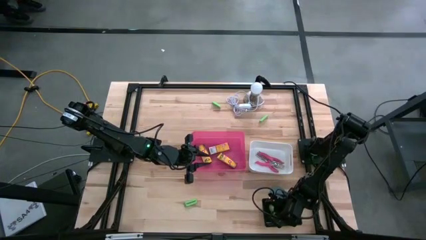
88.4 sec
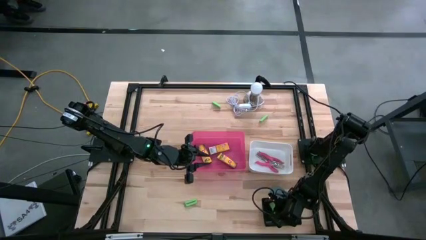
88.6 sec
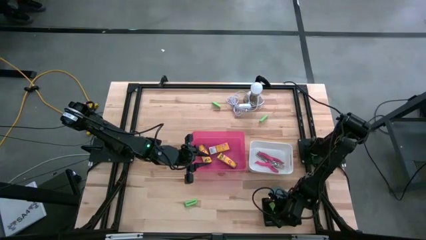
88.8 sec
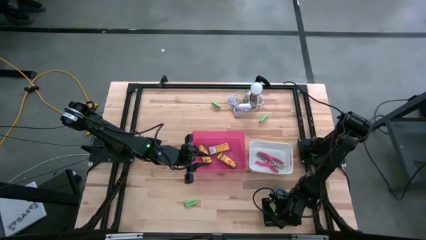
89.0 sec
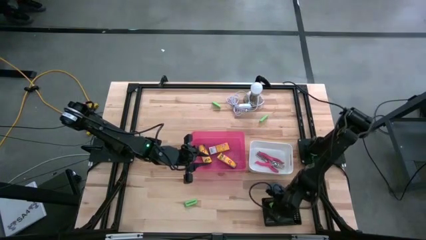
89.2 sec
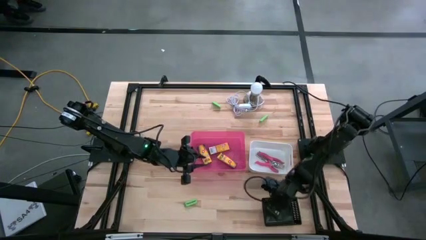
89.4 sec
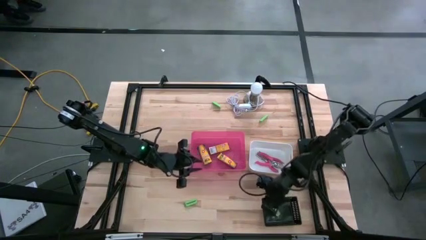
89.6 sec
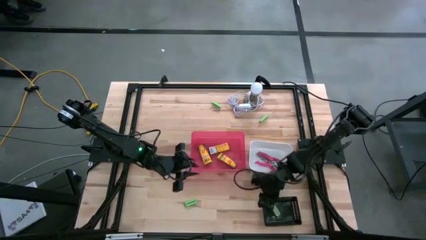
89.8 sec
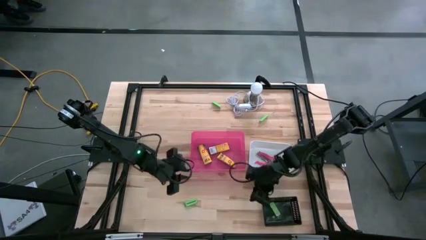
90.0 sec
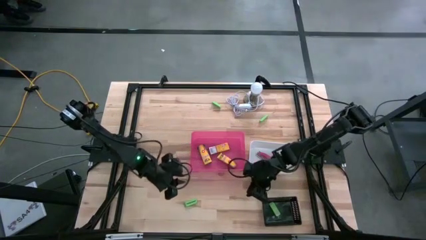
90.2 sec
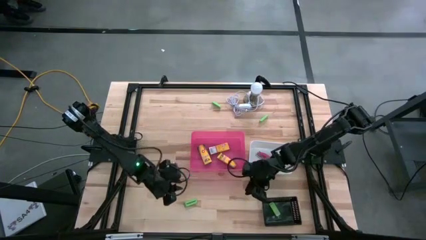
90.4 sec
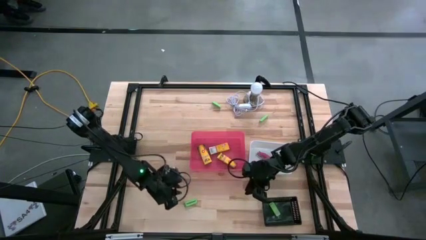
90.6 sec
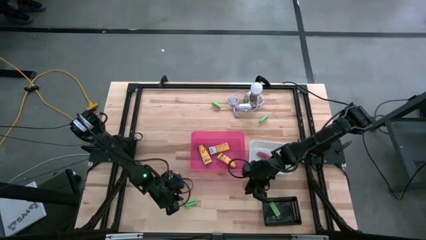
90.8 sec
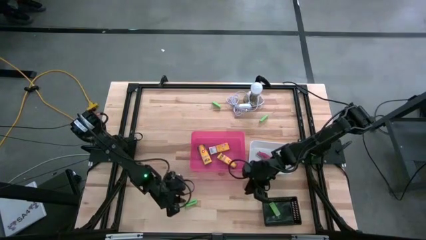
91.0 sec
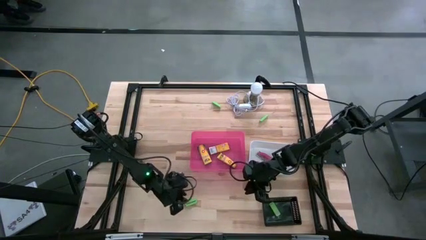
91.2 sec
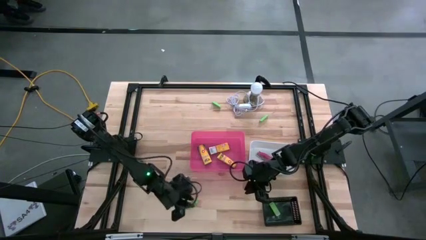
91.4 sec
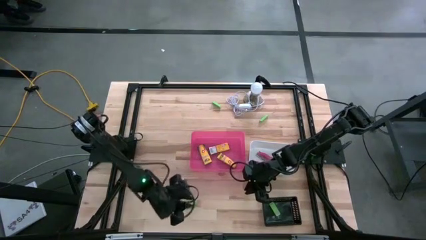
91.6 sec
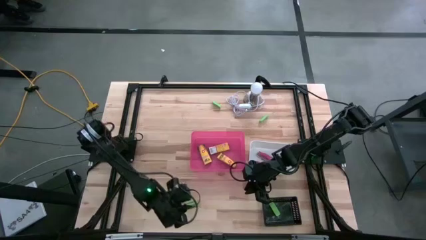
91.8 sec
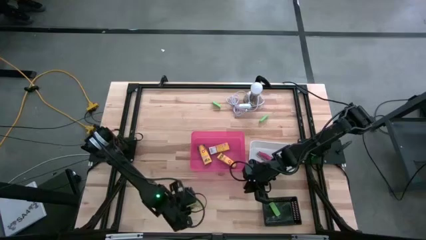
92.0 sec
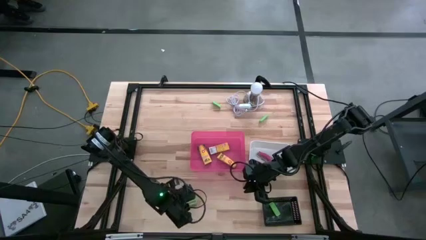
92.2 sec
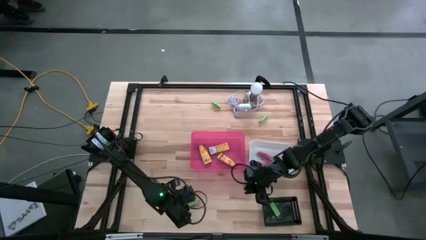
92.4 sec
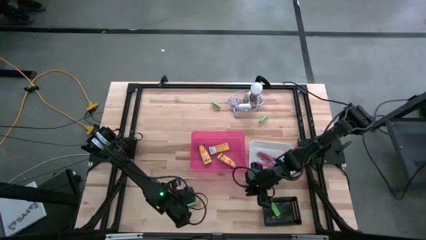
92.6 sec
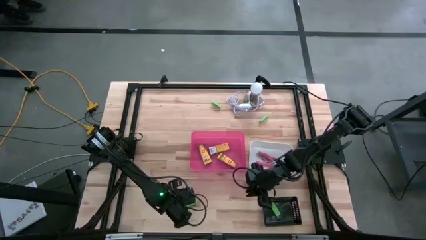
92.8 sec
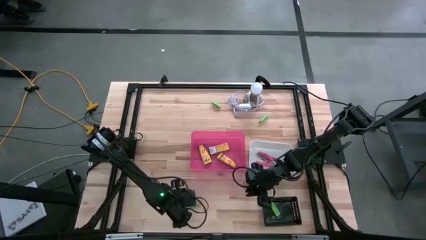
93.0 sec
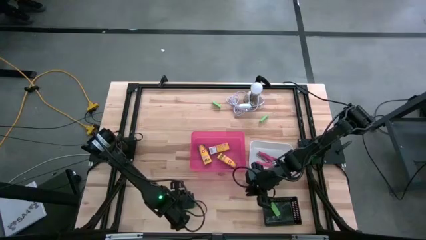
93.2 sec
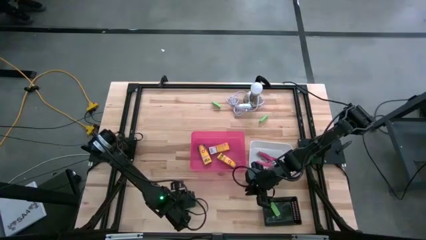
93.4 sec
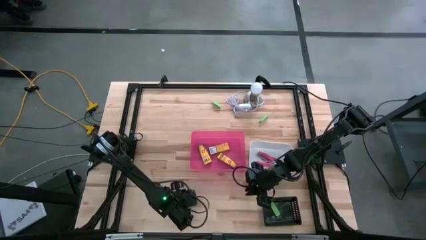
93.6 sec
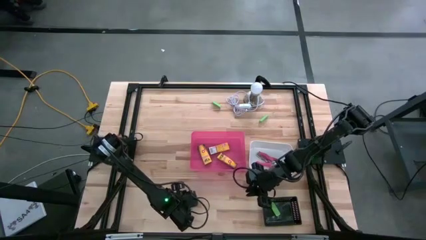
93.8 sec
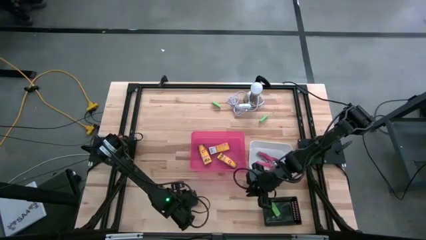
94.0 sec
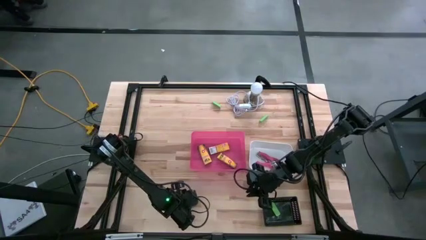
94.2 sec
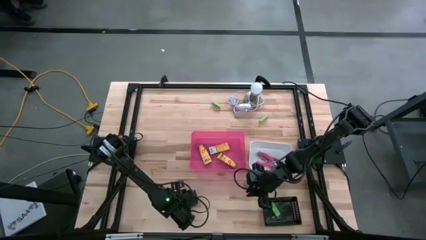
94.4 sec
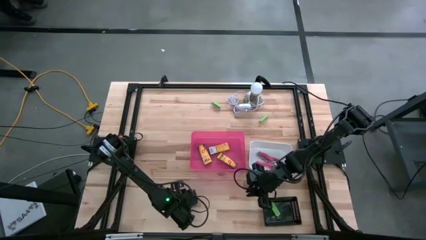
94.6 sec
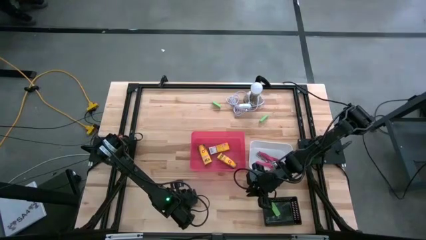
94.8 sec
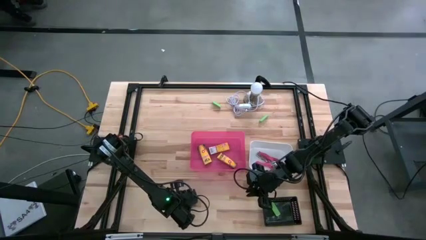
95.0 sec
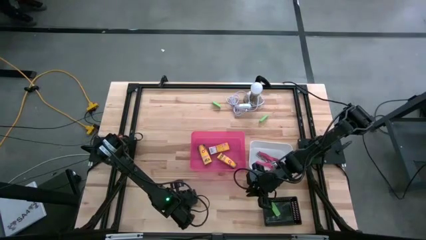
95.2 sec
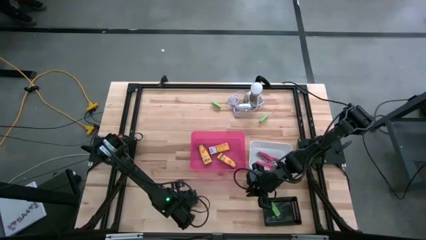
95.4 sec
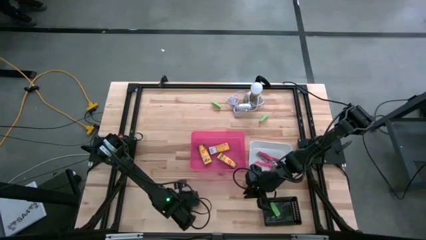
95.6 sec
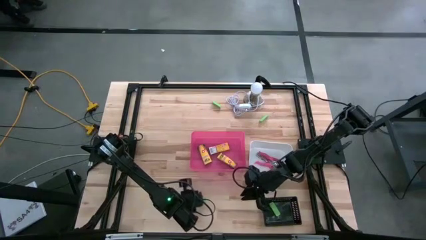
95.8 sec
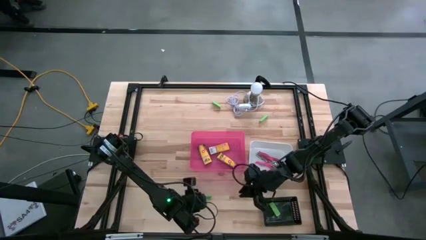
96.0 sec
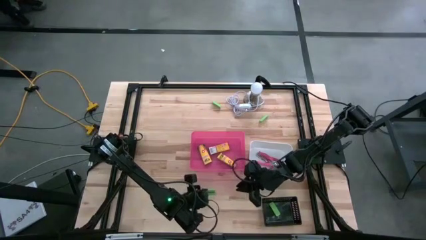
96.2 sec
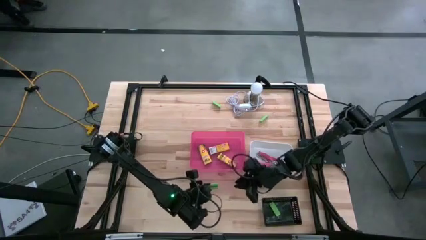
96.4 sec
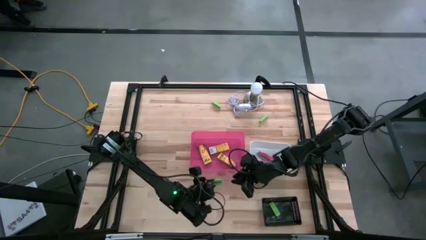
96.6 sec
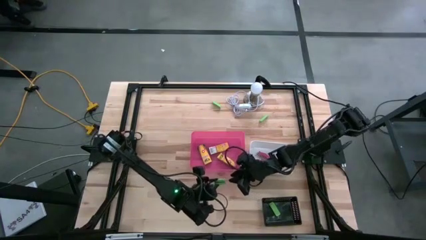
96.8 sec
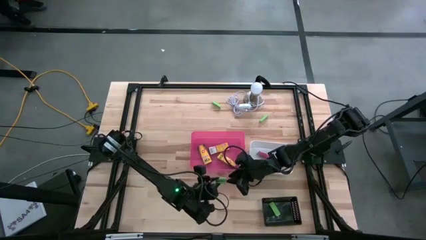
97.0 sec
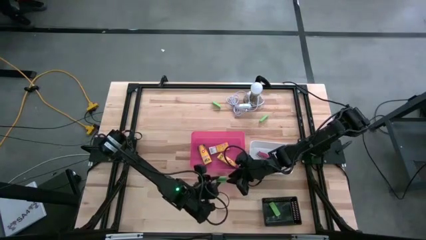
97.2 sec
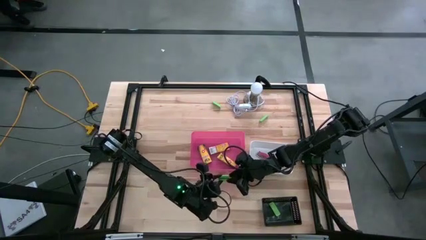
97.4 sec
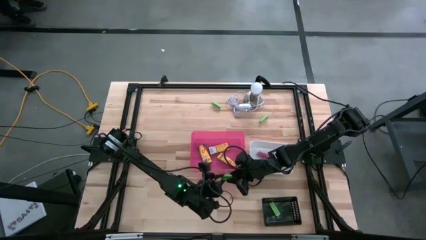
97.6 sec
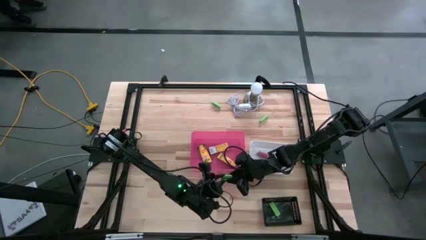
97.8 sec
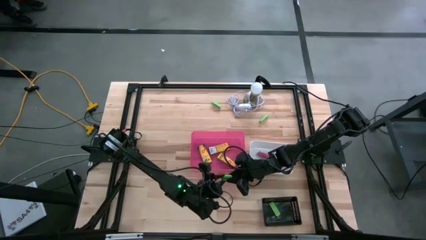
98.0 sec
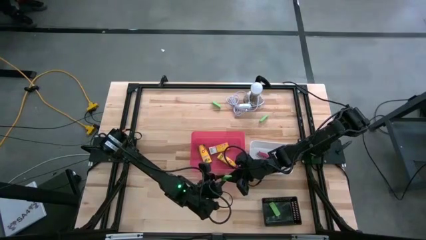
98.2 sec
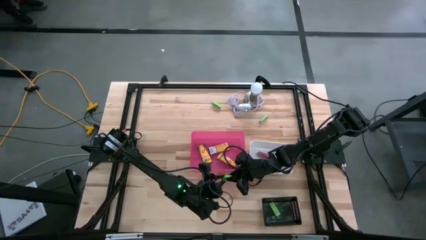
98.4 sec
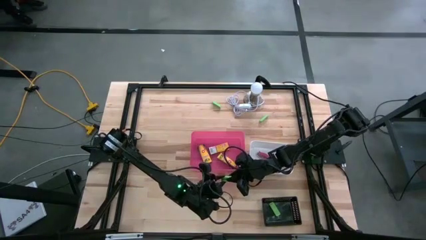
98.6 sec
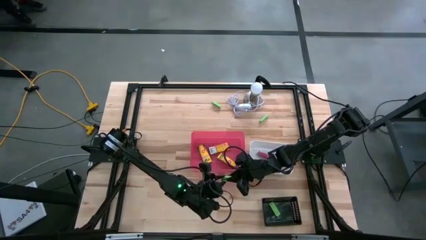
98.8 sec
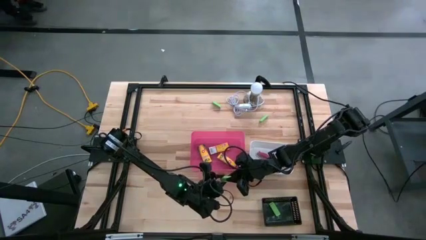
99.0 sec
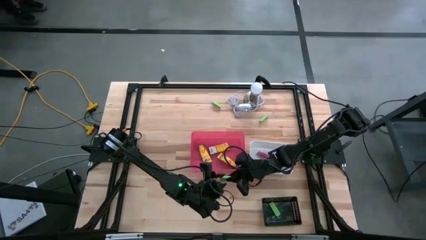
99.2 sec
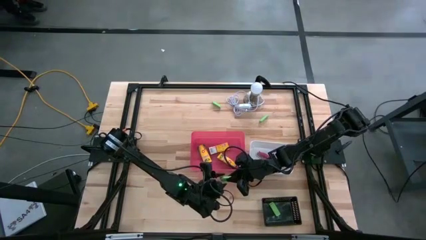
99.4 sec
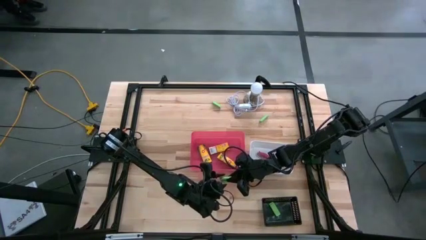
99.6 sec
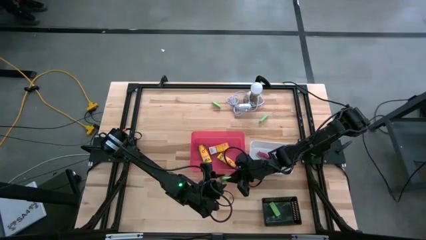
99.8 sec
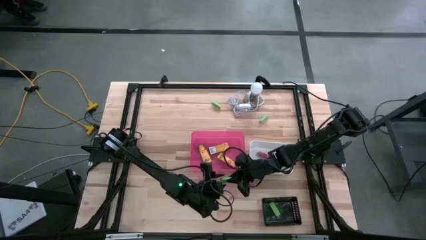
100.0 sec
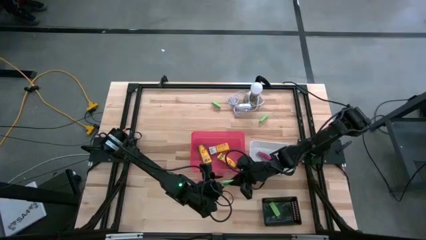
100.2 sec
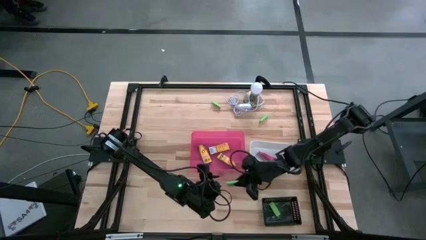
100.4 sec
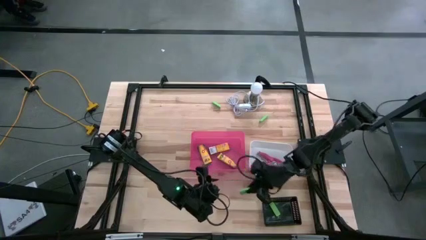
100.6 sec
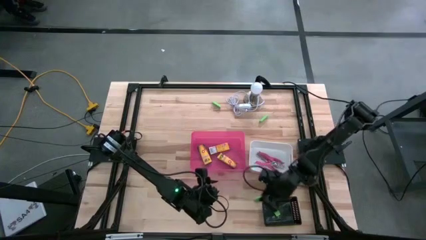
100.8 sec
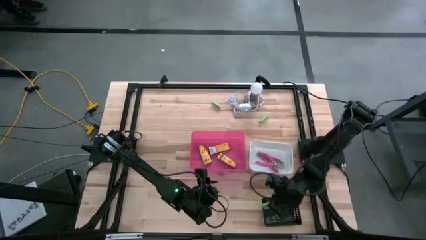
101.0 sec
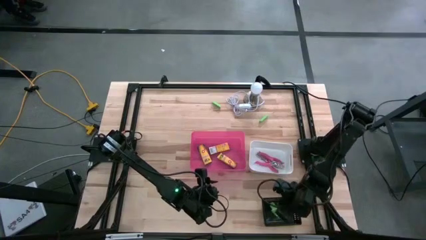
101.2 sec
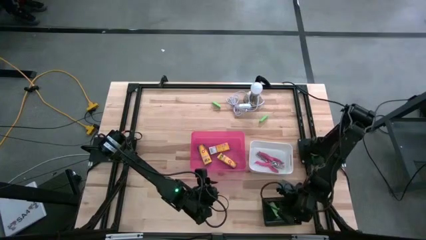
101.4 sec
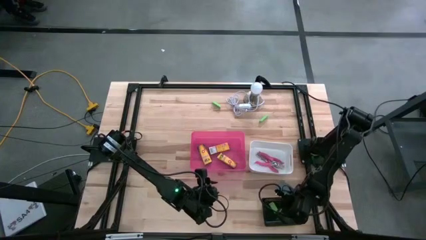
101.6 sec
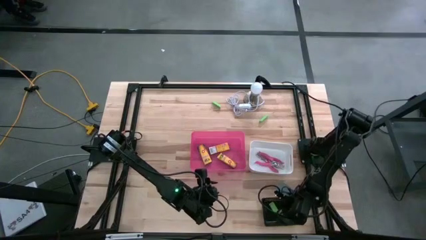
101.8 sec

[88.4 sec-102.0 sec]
Task: Pick & Place School Supplies
Put the green eraser into the black bin
